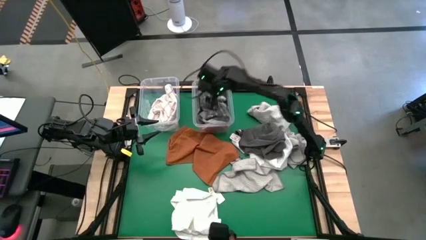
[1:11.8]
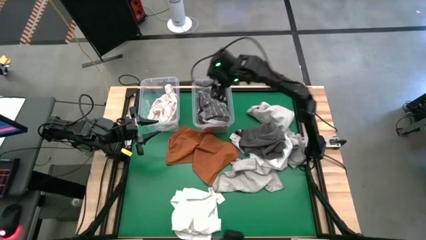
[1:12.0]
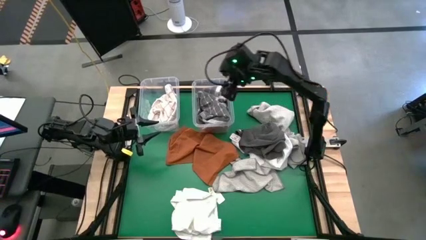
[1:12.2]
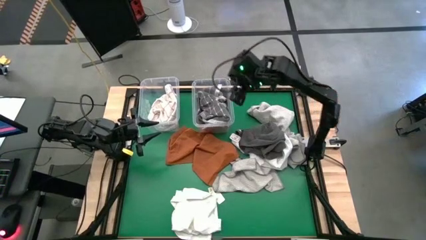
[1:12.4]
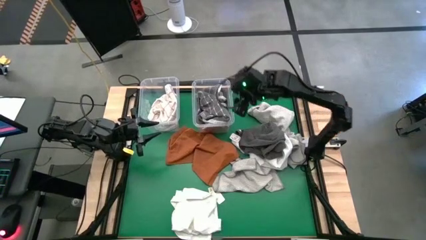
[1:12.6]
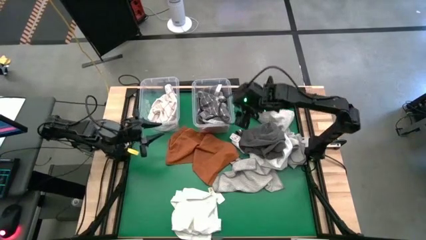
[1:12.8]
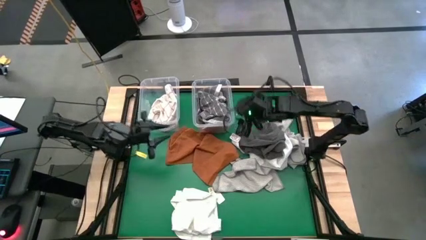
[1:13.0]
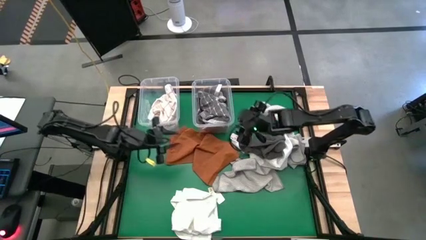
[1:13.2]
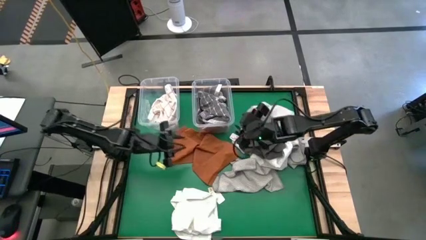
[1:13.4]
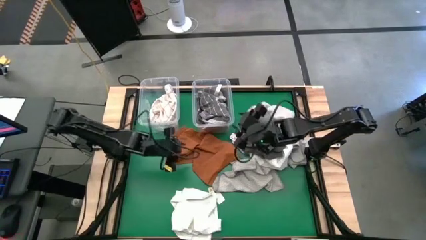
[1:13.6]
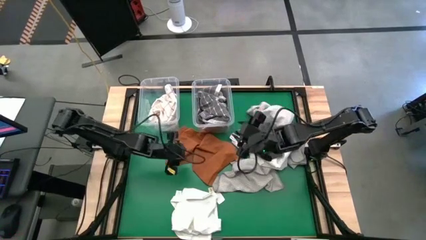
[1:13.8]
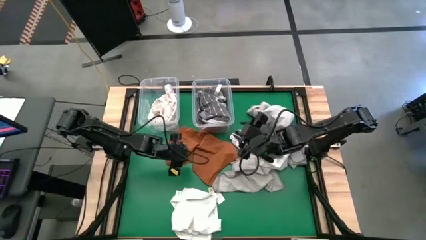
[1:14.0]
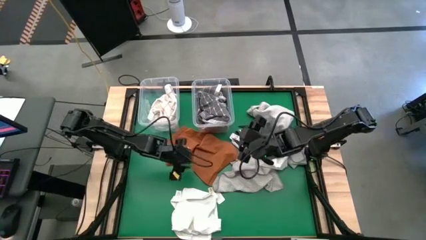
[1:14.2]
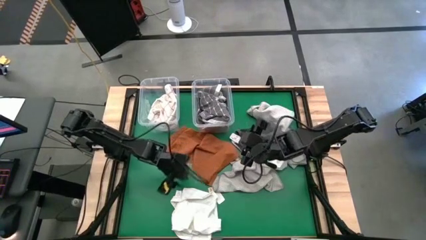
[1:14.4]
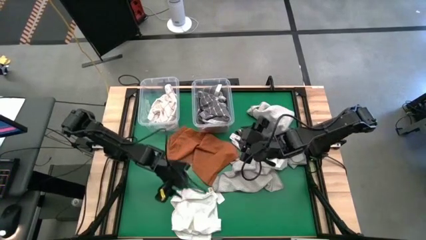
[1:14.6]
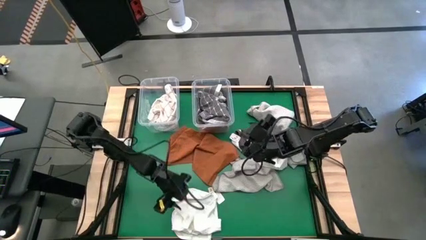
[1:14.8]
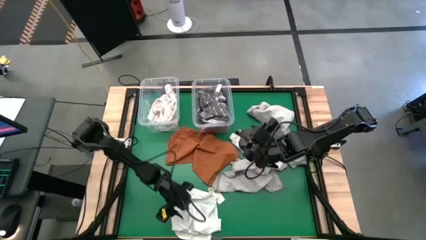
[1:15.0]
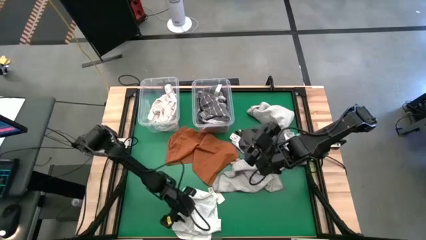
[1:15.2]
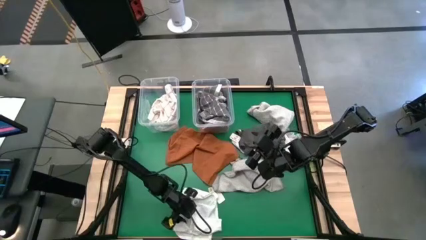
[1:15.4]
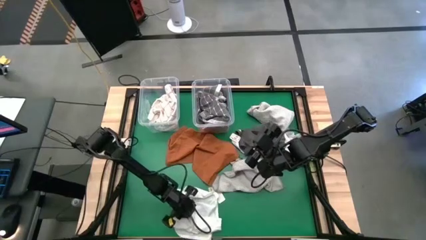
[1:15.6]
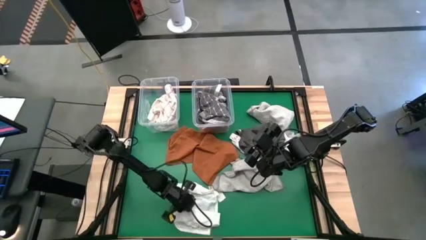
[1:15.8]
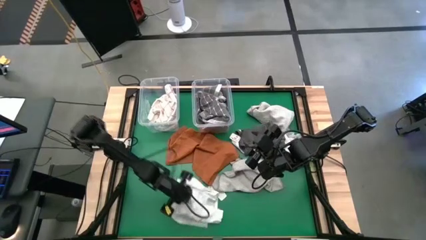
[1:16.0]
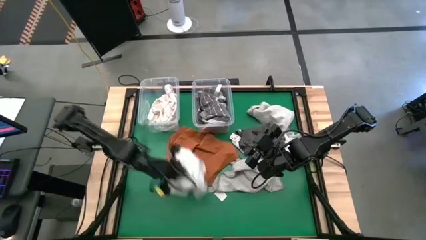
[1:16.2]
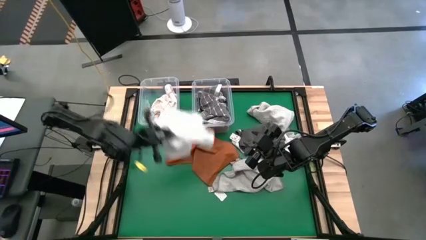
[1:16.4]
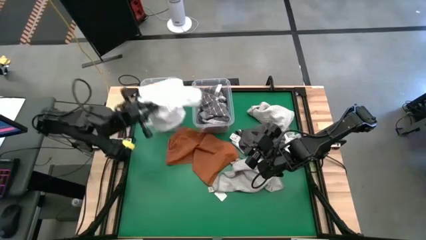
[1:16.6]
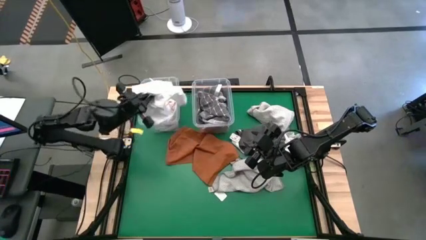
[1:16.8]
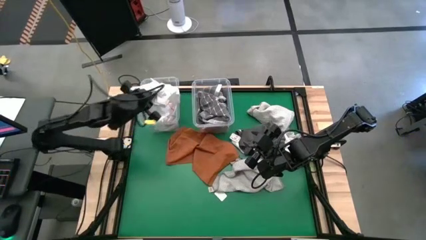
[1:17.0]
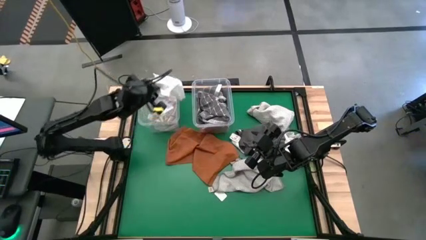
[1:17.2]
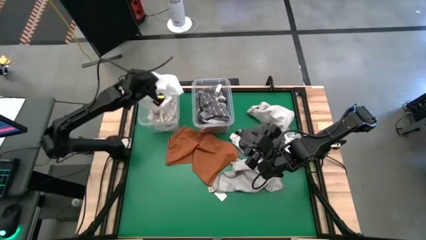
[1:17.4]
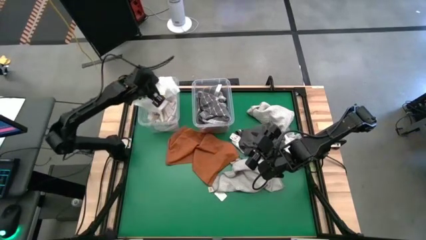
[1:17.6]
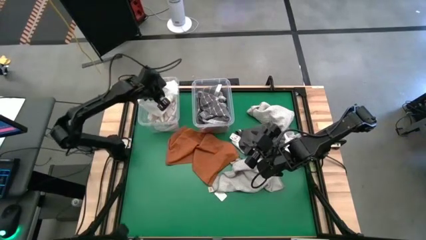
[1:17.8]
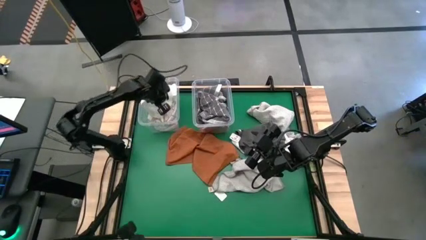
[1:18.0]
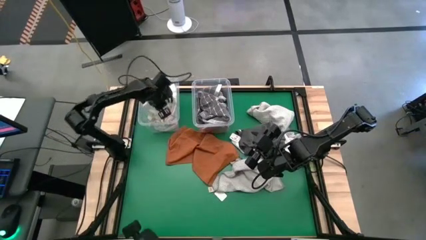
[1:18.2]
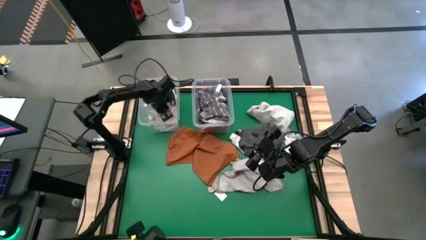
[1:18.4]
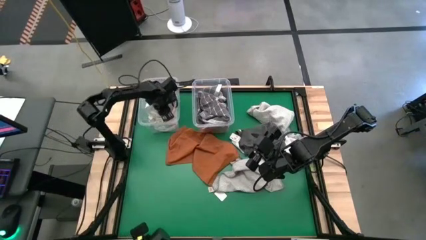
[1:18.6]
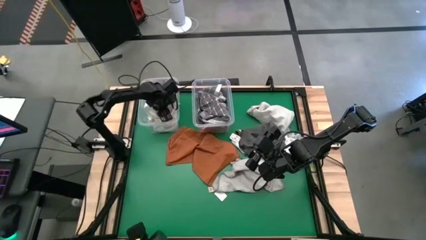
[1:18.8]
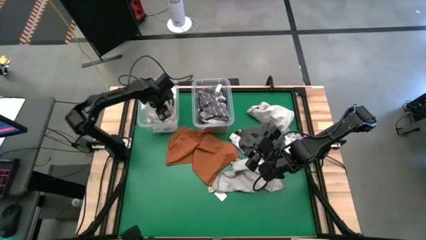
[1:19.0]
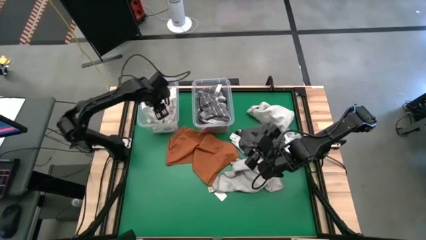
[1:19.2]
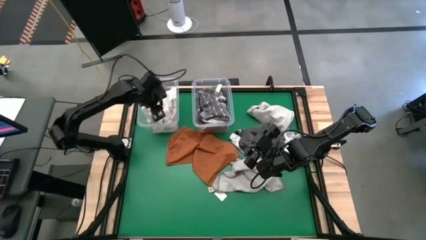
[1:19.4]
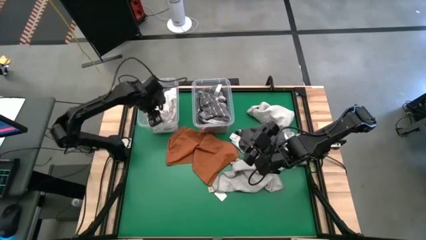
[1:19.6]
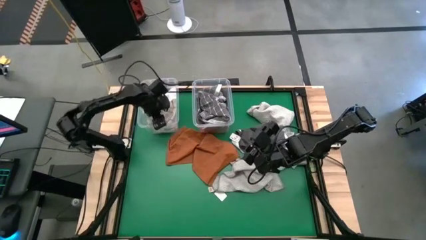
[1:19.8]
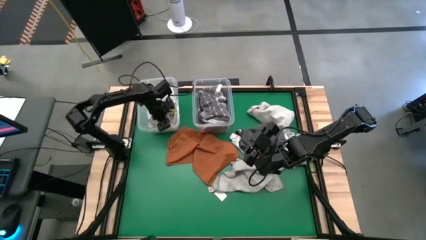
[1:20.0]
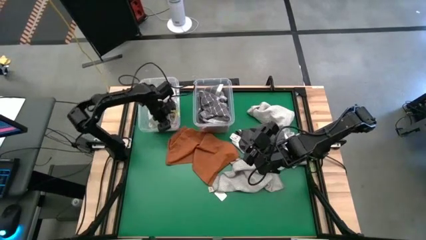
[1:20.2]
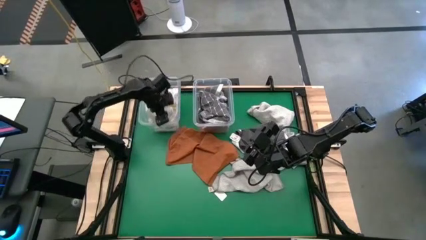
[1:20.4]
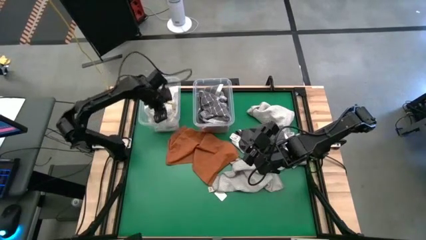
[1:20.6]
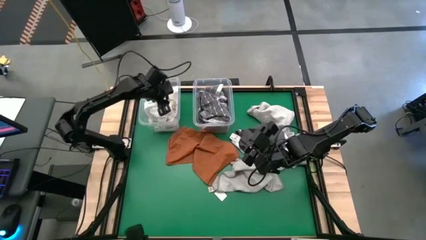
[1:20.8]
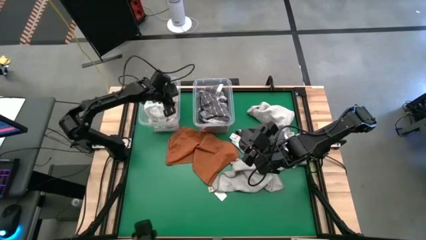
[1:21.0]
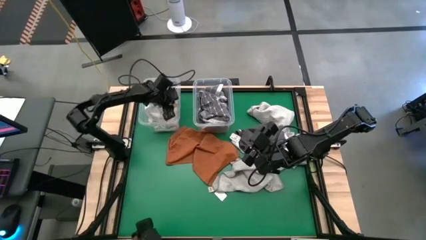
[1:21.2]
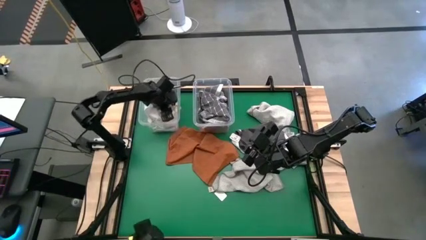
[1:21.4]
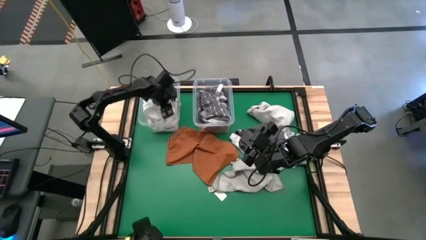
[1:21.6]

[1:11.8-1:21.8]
Task: Sort towels by color in basket
Put the white towel into the left transparent bin

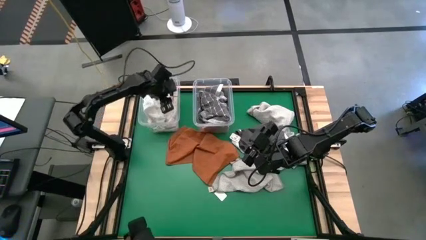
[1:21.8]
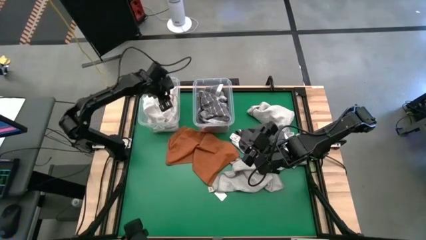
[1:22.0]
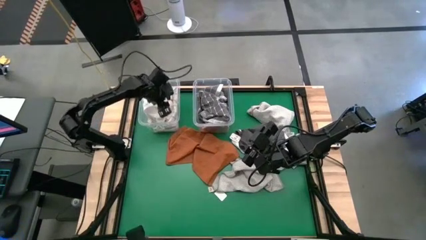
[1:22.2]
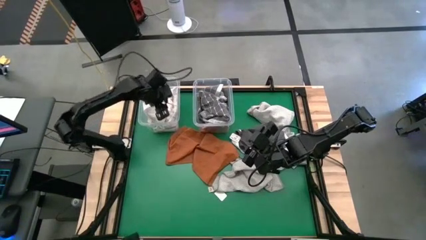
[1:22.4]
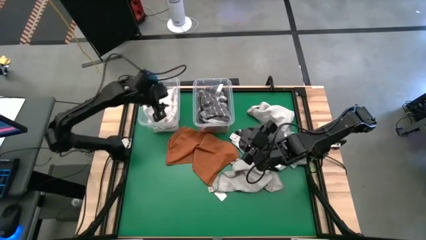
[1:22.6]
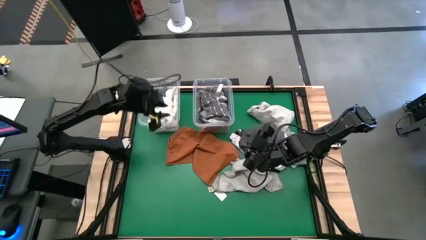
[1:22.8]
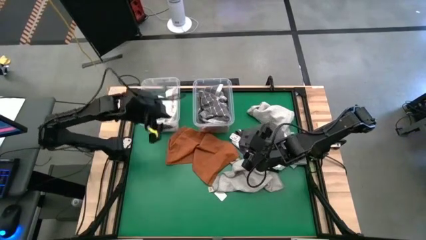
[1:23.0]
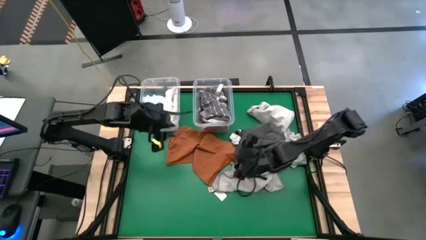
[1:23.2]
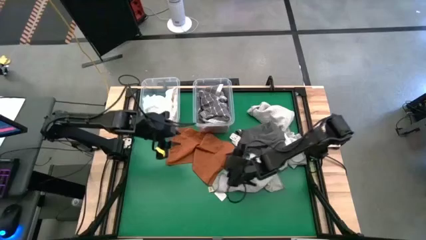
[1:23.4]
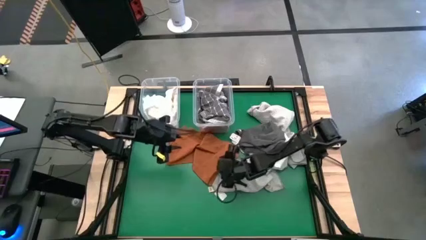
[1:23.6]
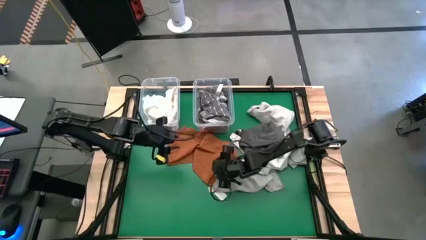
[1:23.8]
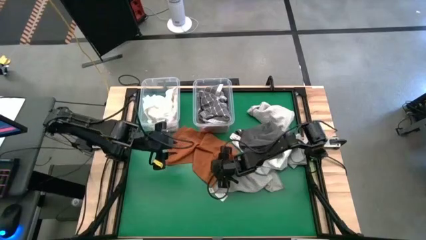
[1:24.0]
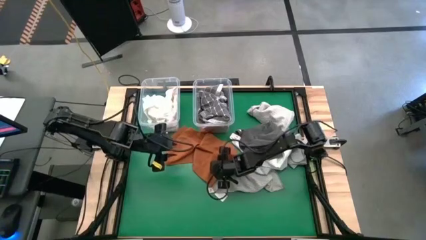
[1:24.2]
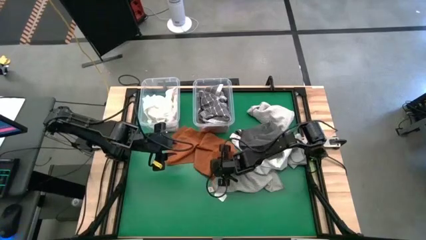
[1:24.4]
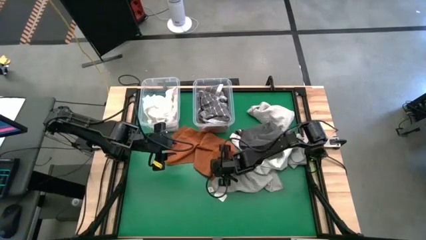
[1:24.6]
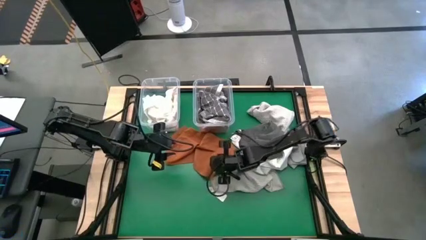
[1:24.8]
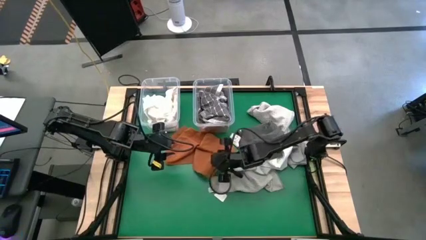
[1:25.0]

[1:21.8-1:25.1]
Put the orange towel into the right transparent bin

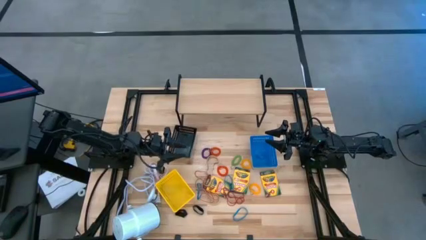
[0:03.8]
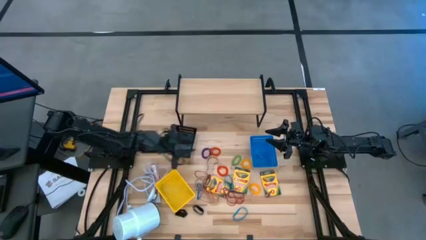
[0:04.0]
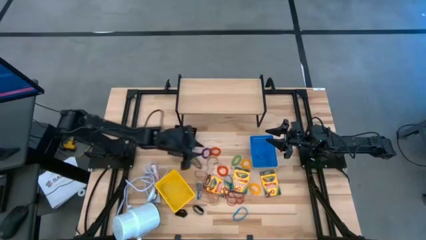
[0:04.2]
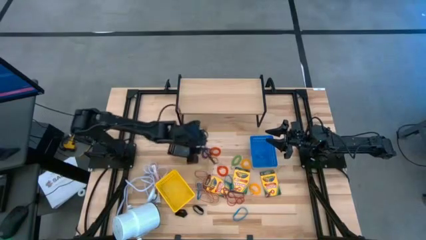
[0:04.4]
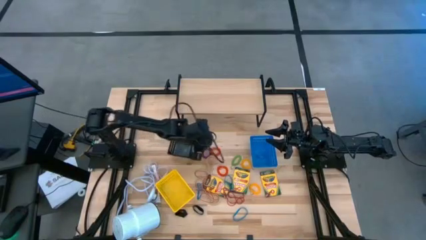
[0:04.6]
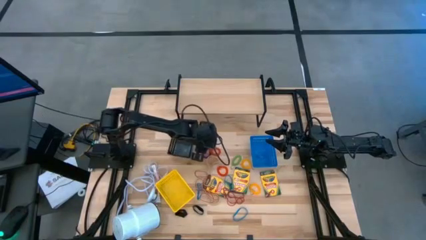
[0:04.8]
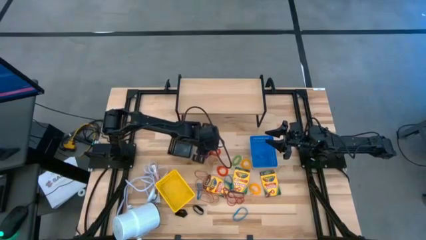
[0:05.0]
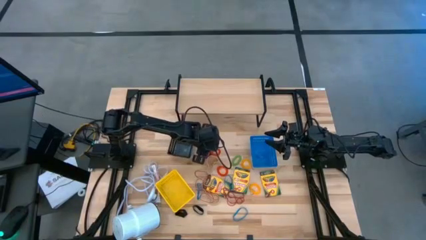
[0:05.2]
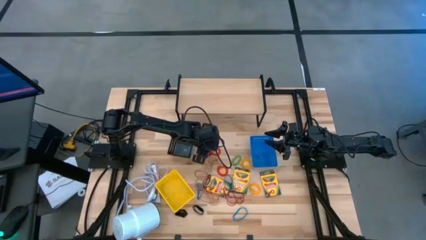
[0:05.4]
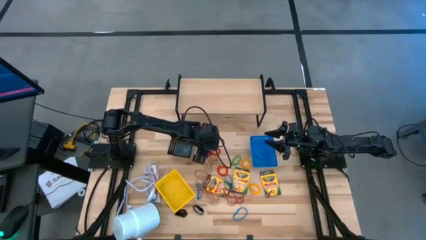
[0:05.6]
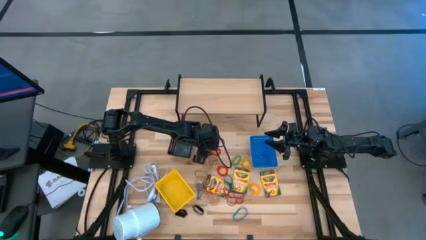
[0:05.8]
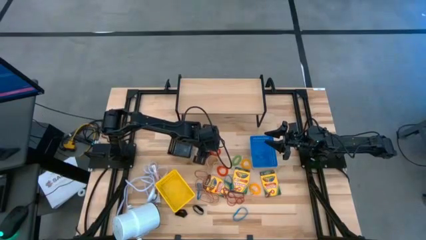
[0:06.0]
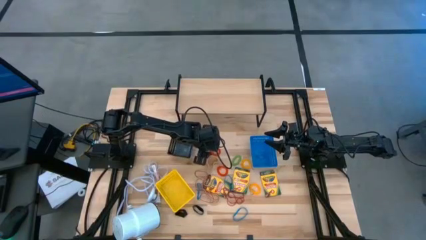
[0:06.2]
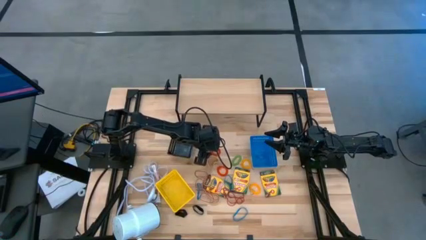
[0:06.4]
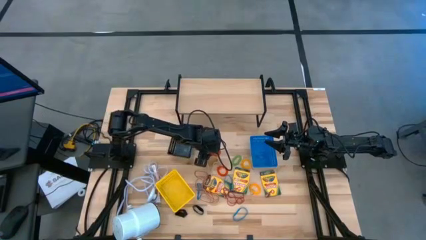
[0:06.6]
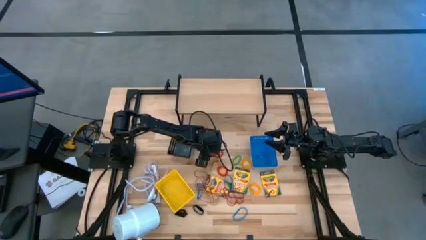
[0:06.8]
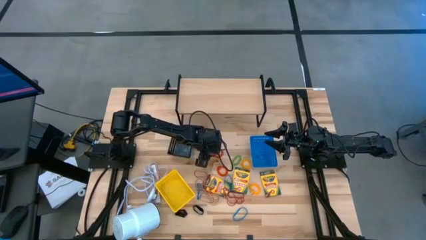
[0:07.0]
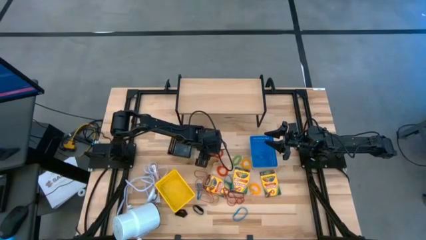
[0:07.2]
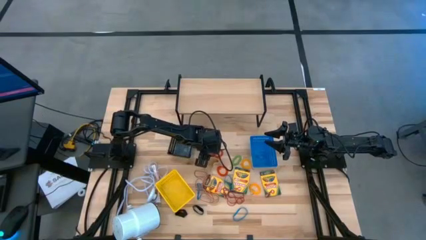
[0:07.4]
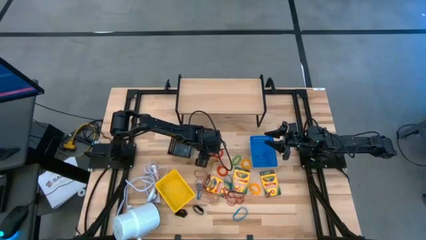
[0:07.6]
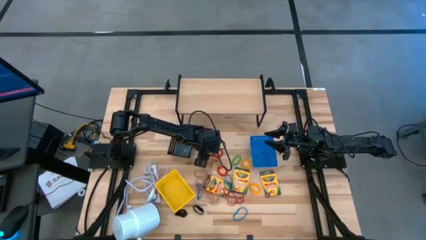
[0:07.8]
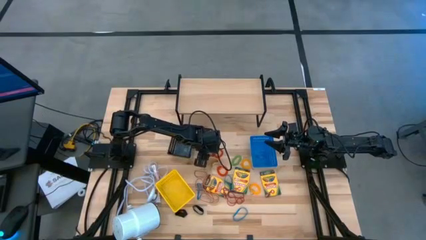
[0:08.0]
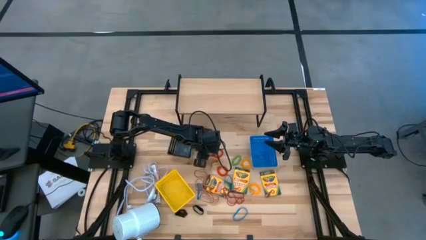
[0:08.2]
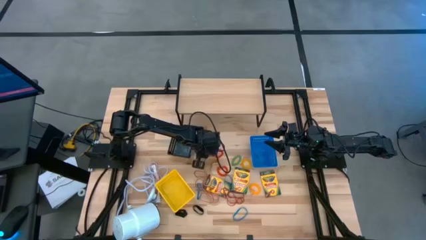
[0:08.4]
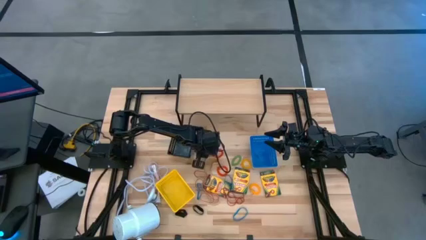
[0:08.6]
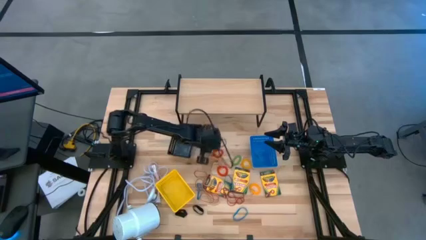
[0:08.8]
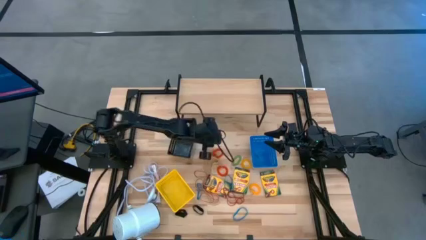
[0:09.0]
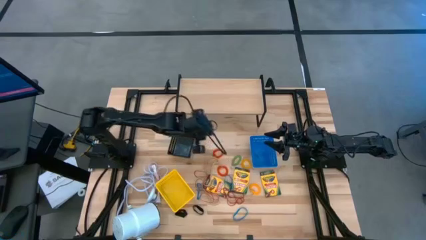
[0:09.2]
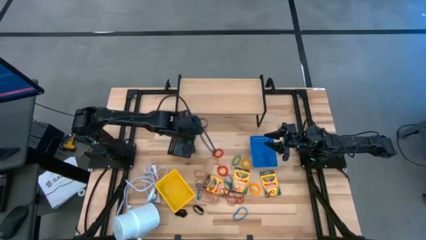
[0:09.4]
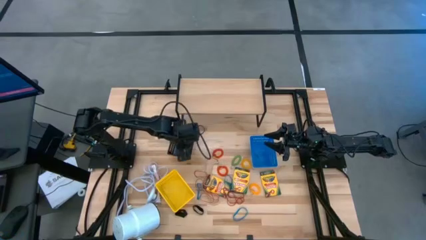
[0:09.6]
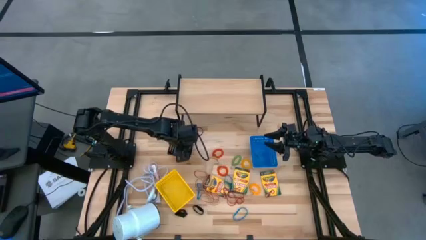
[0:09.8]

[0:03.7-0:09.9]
Task: Pick & Place Office Desk Supplies
Put the purple spring keychain into the black bin
